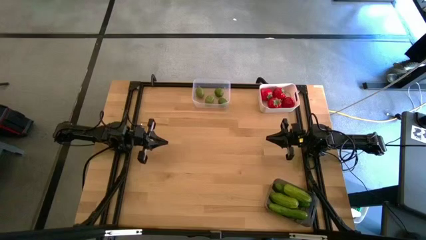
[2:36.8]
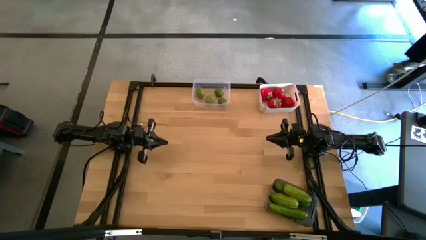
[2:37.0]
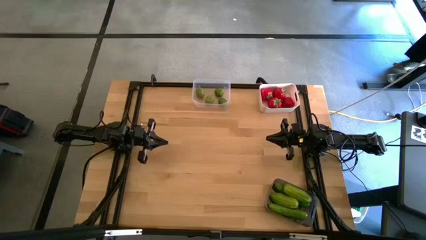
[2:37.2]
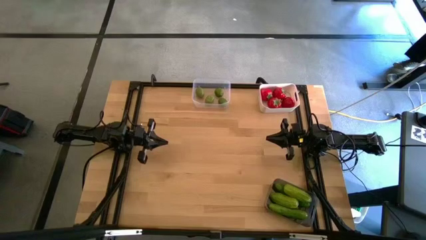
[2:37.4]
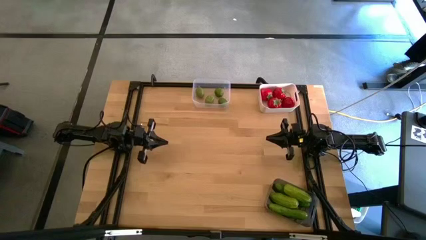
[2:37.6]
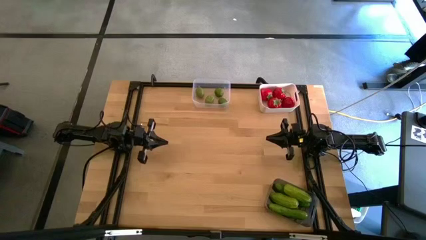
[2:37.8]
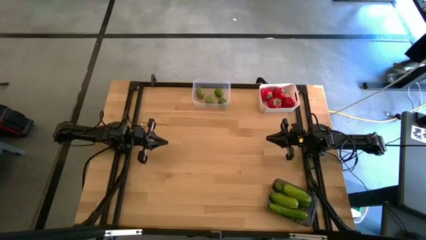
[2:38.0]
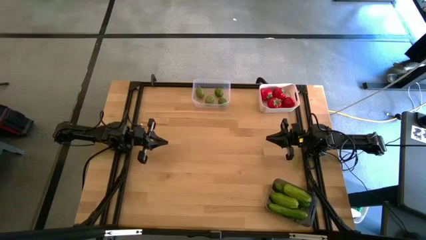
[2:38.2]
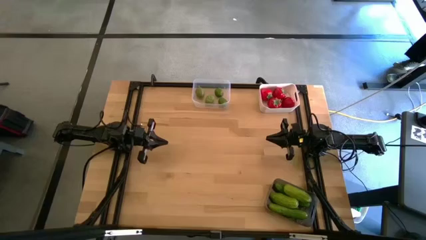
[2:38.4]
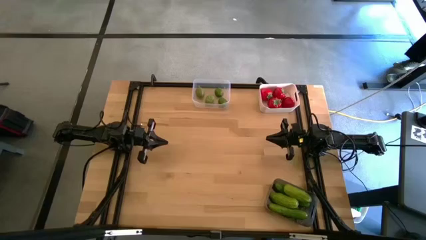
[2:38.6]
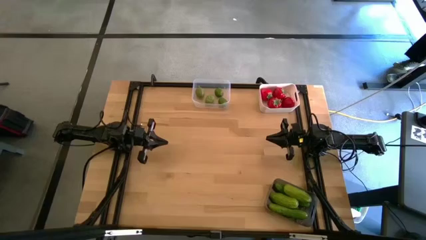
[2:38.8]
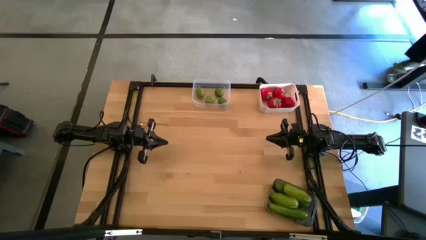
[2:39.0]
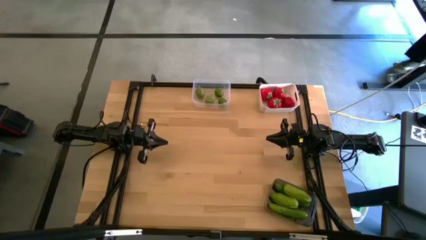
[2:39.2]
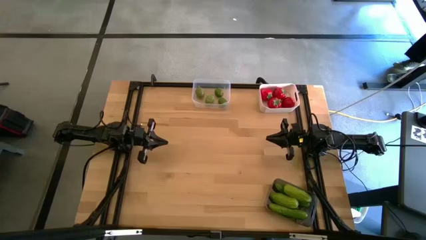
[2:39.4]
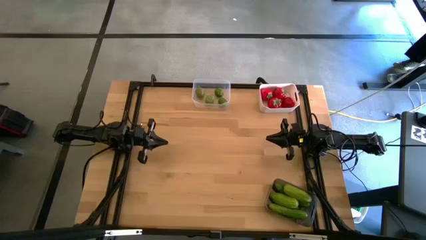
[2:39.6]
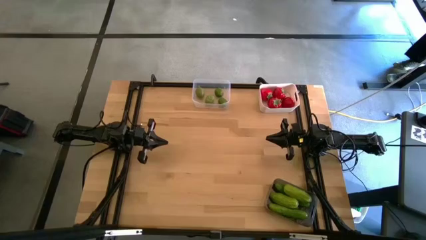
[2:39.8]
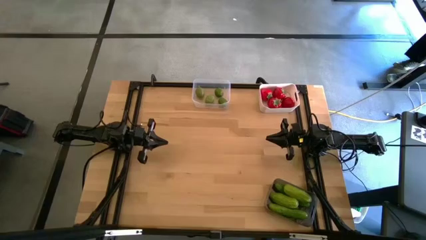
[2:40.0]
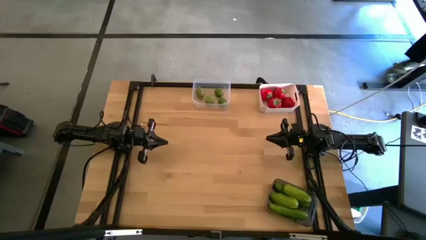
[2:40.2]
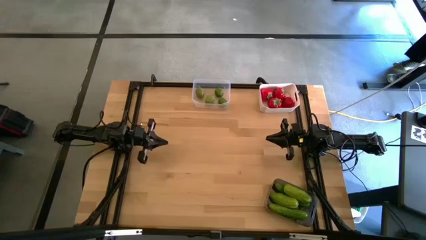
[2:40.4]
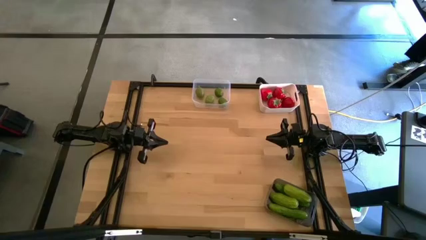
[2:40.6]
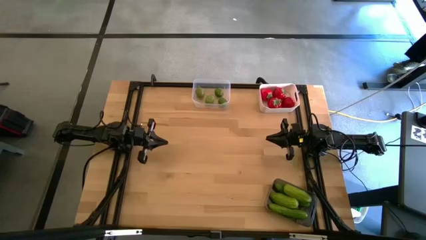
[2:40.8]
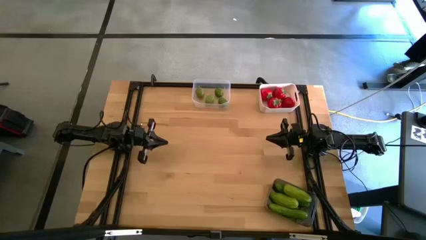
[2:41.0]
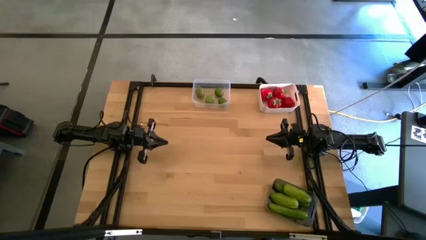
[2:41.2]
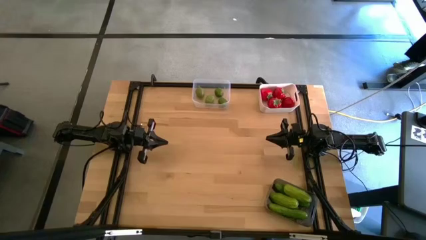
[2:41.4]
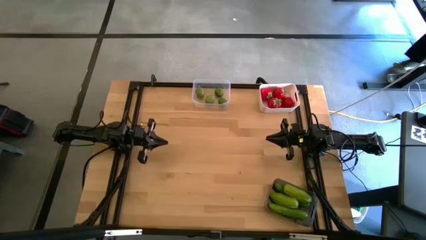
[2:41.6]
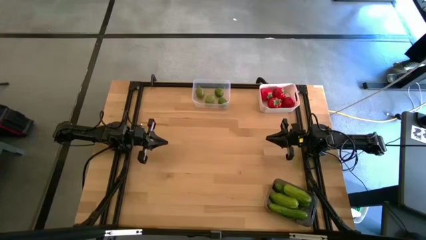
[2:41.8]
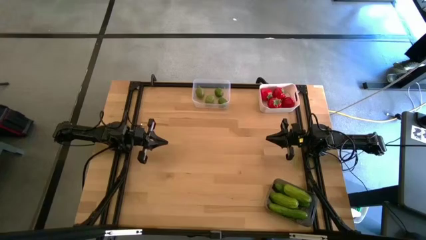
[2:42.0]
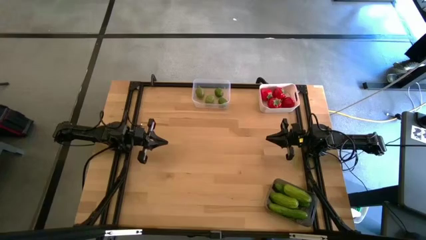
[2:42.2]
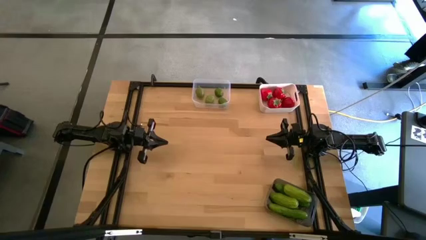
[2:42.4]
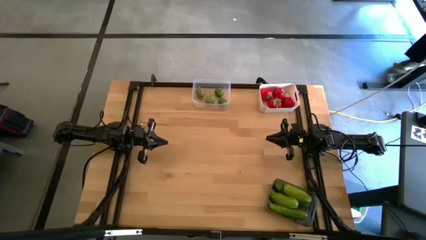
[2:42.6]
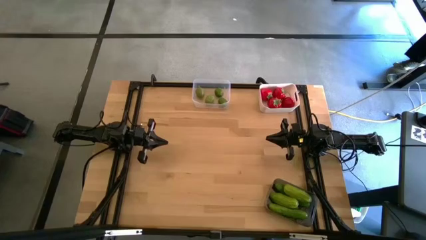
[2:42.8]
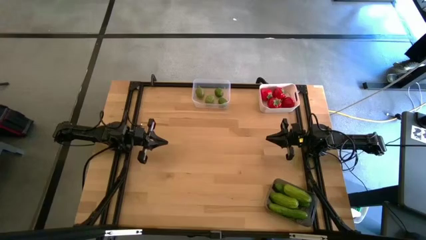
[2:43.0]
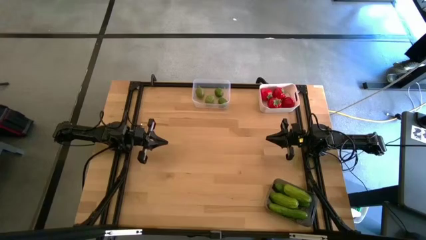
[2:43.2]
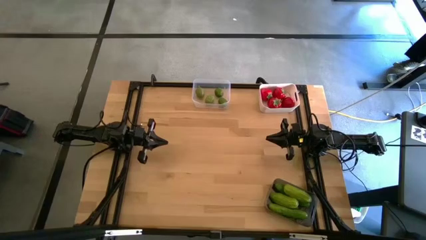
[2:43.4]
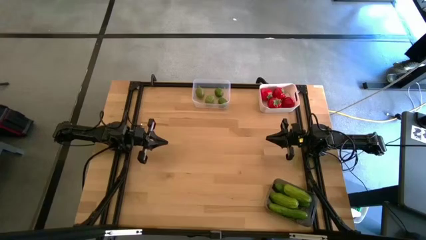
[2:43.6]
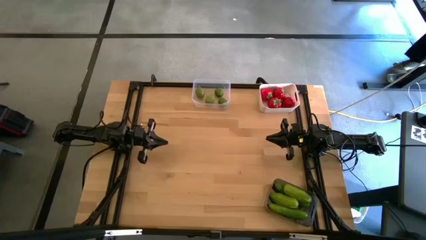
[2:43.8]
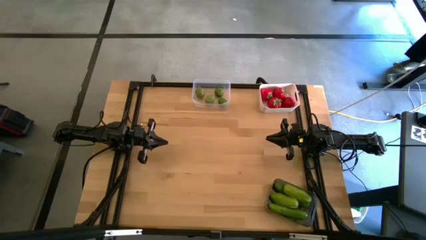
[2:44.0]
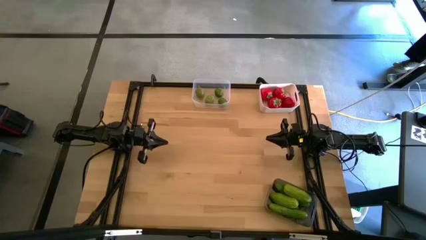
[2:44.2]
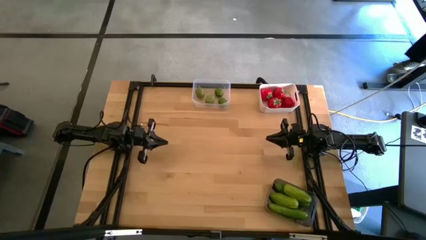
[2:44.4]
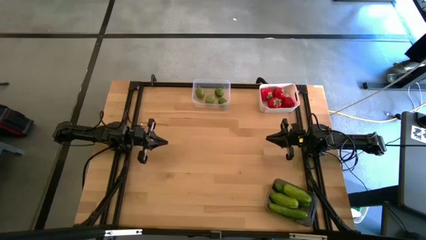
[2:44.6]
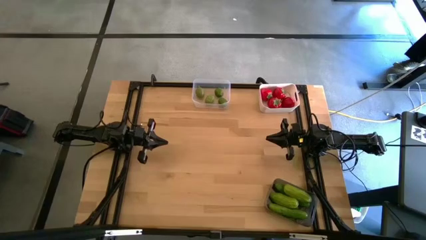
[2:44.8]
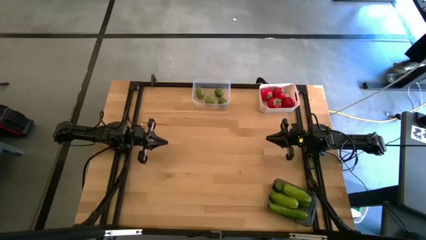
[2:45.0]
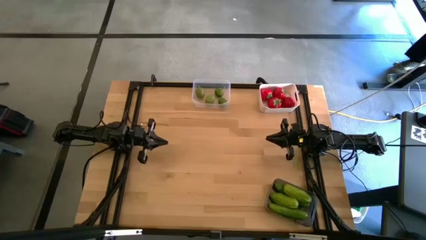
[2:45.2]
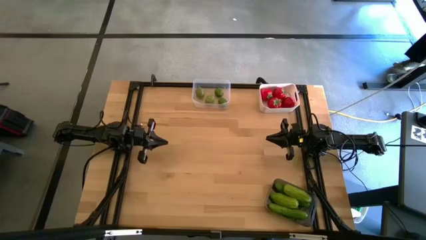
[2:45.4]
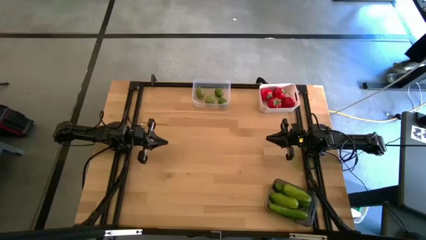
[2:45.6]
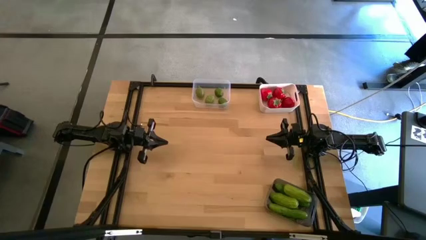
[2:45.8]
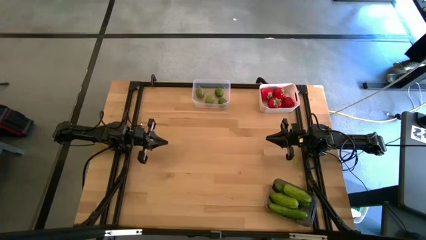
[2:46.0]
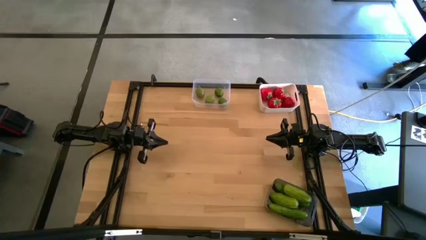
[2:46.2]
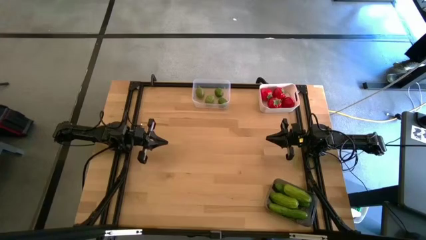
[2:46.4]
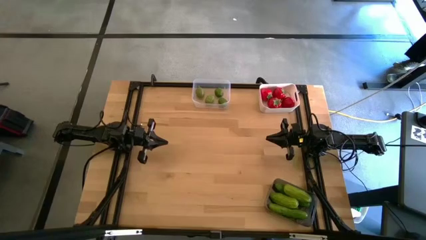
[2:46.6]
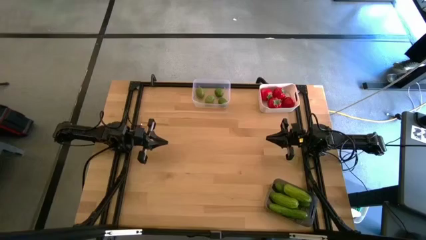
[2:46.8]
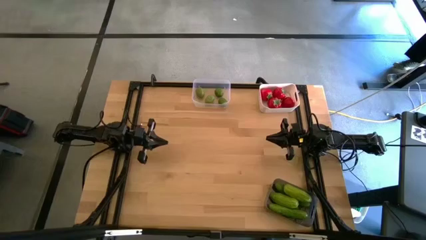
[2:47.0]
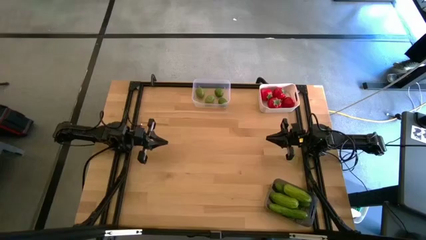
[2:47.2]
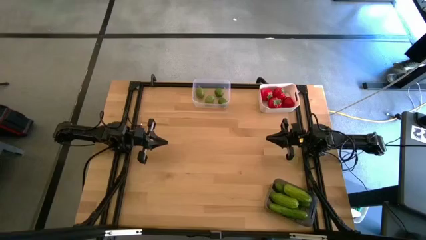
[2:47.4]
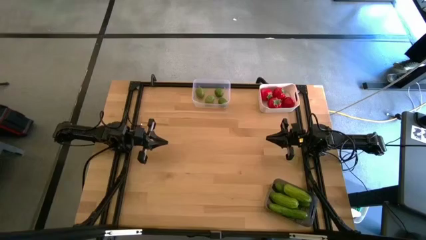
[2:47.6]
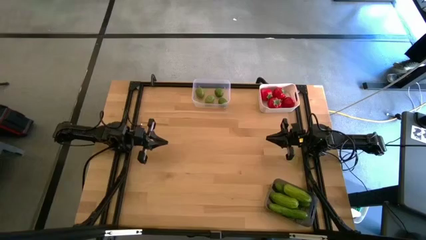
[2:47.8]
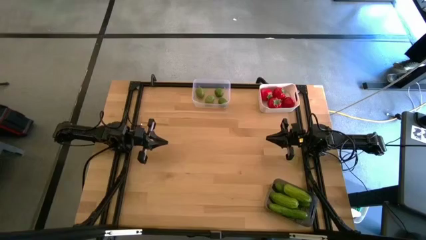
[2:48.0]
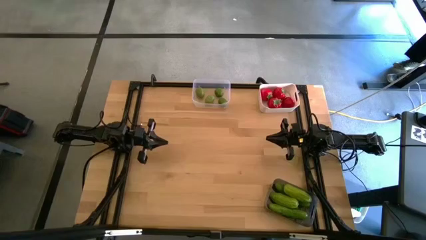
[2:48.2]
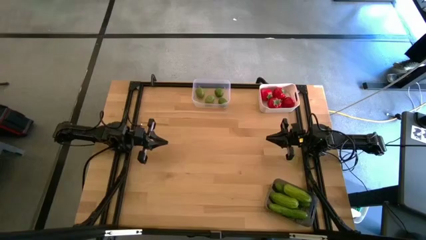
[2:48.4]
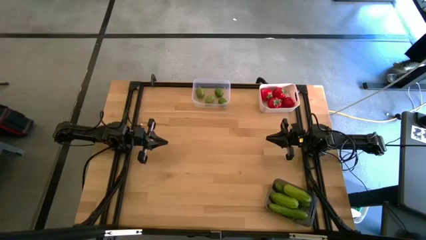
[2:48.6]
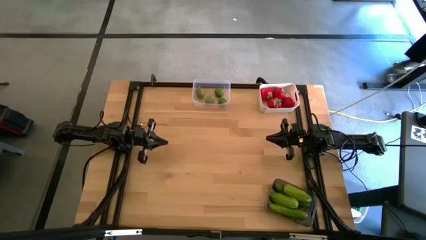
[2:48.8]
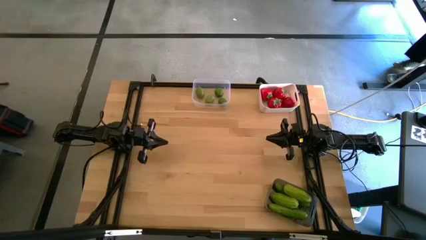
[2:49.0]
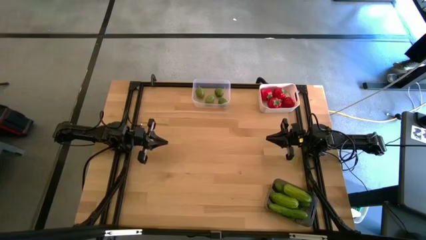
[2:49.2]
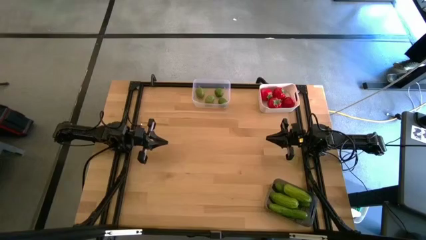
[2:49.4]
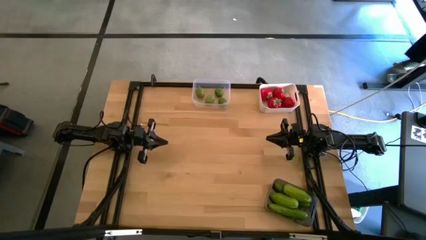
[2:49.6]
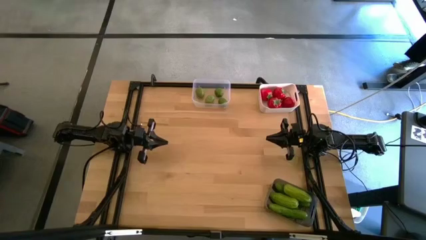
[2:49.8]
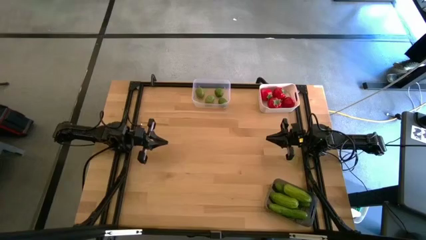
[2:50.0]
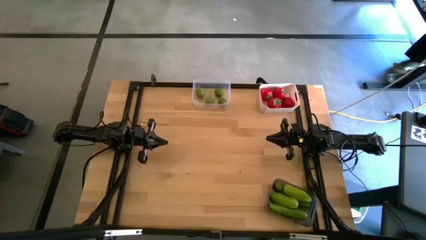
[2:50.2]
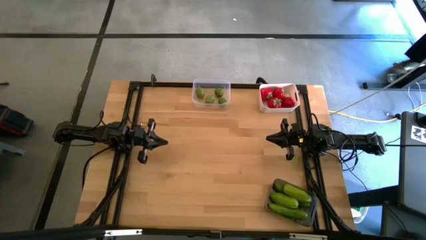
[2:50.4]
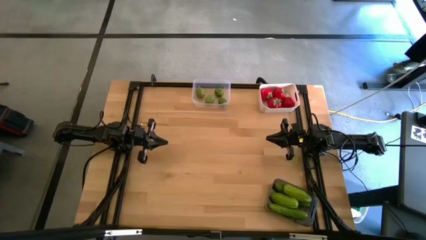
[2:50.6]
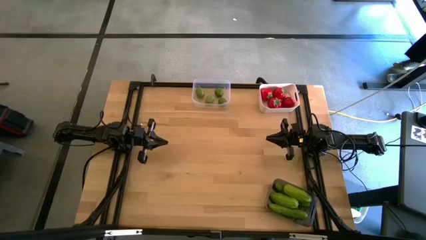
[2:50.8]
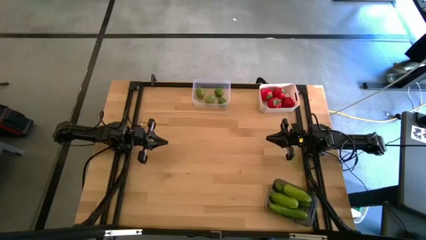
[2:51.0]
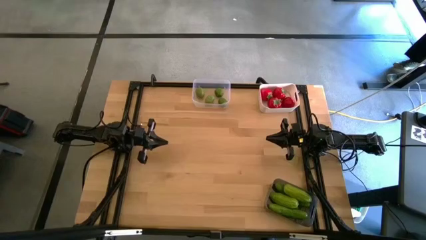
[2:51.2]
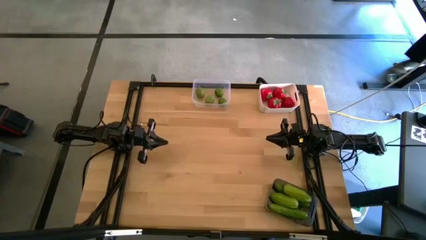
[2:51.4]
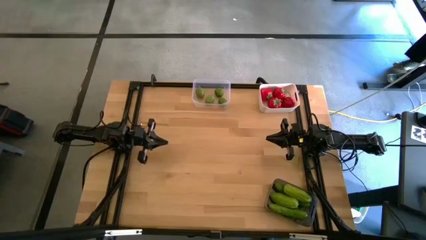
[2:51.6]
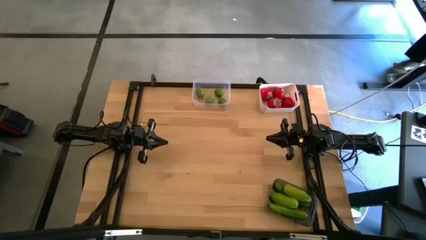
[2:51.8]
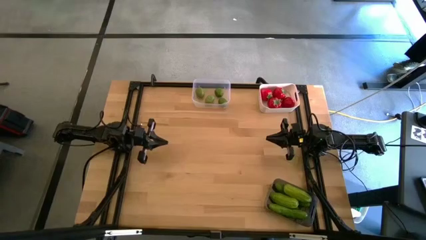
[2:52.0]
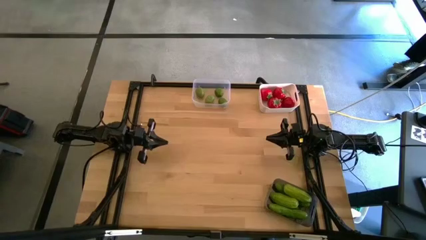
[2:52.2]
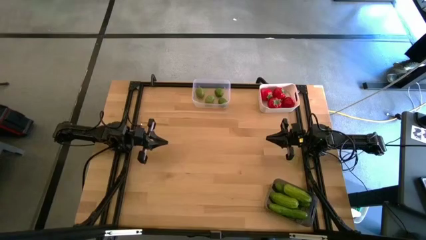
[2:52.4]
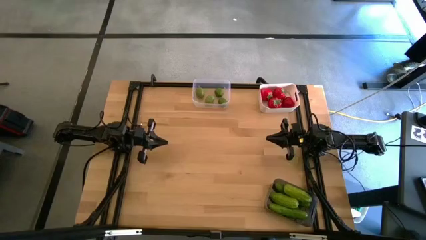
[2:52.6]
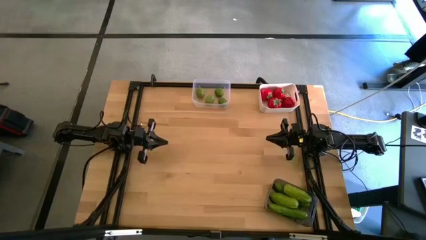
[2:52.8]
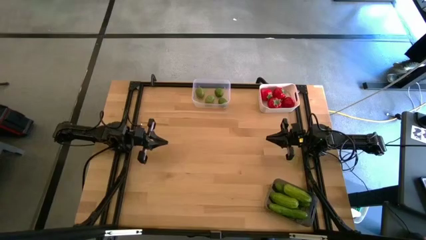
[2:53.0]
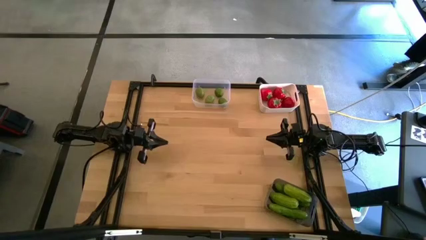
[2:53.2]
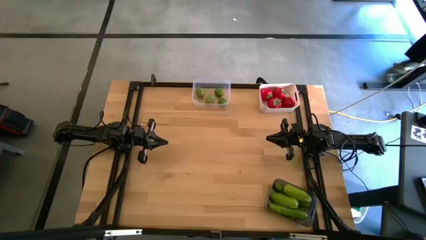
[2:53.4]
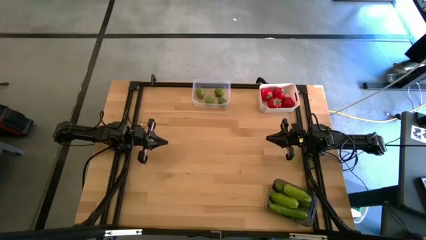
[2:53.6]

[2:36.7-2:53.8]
Task: Sort produce into baskets
Return to Home Position
